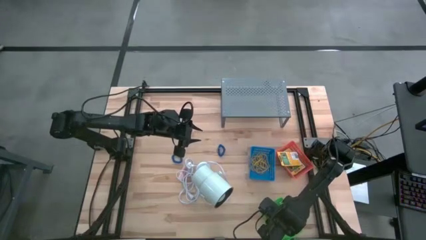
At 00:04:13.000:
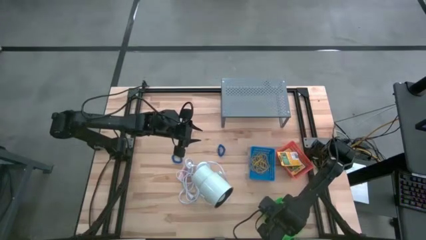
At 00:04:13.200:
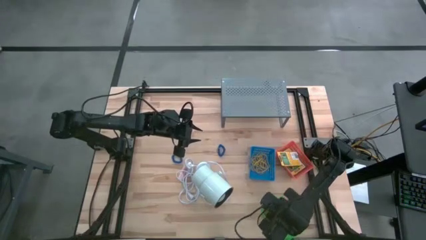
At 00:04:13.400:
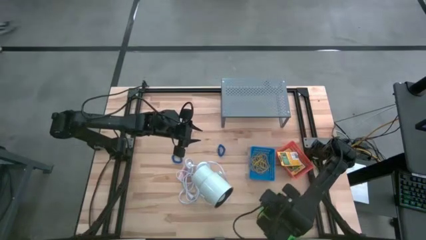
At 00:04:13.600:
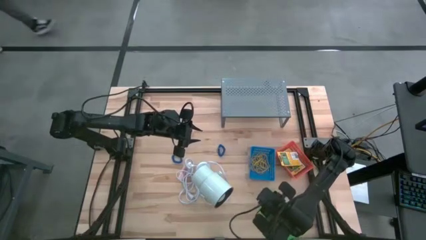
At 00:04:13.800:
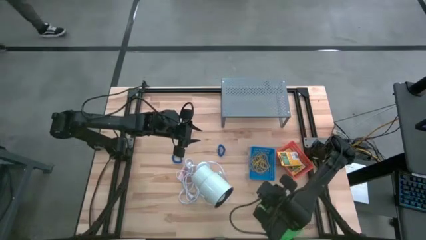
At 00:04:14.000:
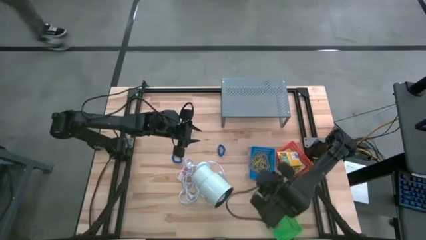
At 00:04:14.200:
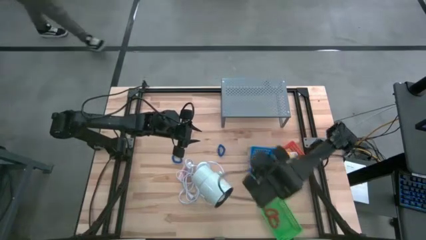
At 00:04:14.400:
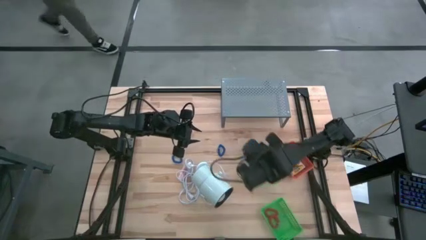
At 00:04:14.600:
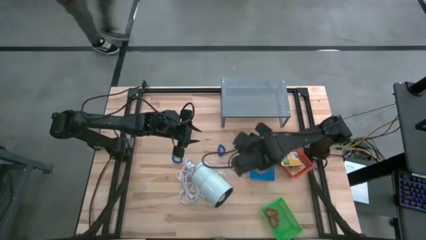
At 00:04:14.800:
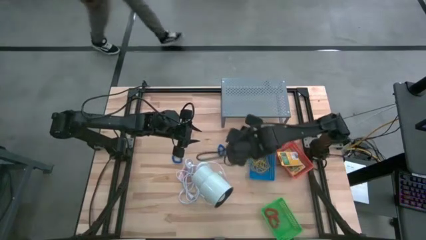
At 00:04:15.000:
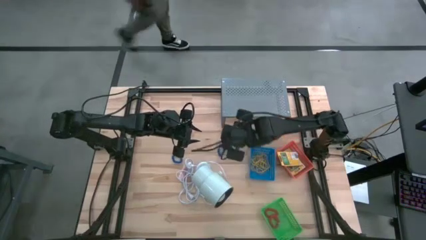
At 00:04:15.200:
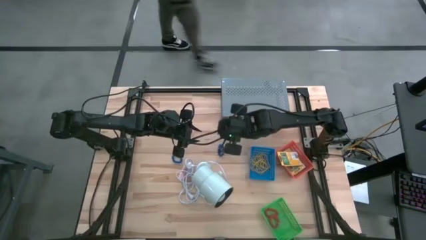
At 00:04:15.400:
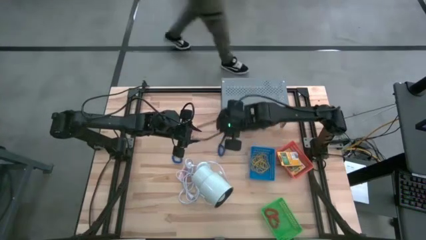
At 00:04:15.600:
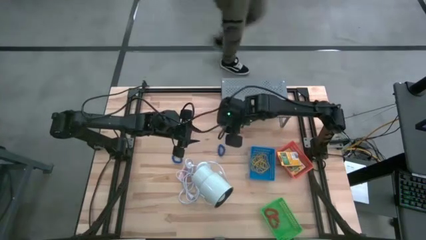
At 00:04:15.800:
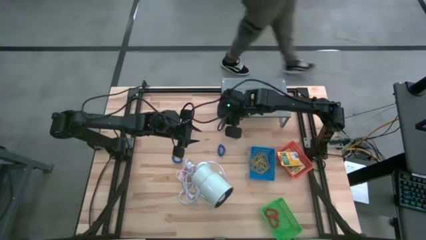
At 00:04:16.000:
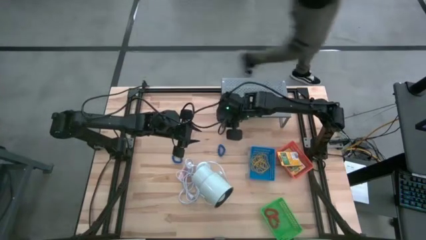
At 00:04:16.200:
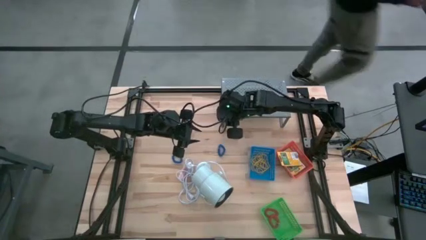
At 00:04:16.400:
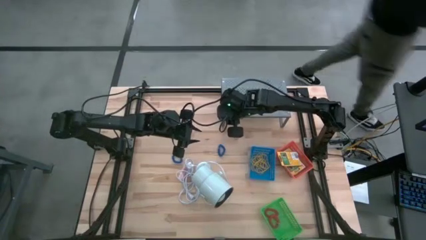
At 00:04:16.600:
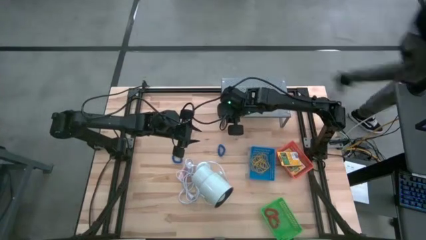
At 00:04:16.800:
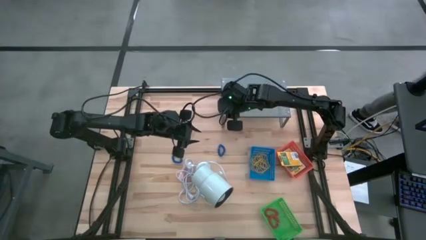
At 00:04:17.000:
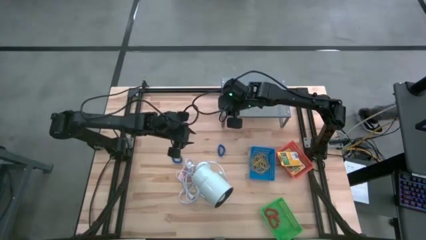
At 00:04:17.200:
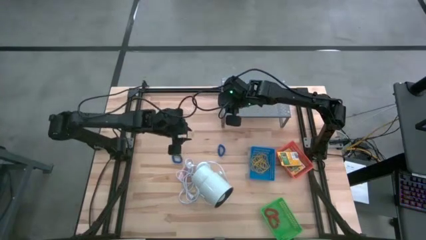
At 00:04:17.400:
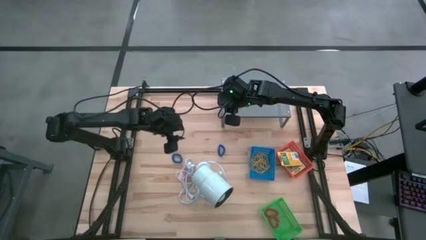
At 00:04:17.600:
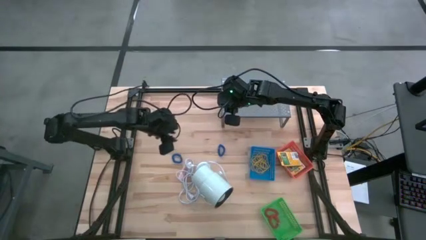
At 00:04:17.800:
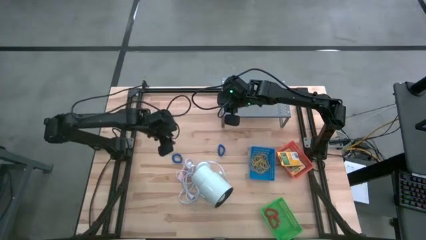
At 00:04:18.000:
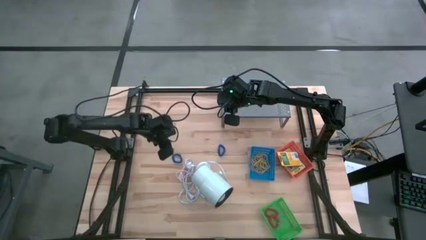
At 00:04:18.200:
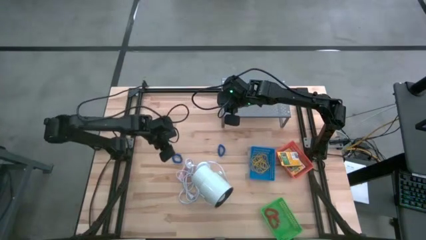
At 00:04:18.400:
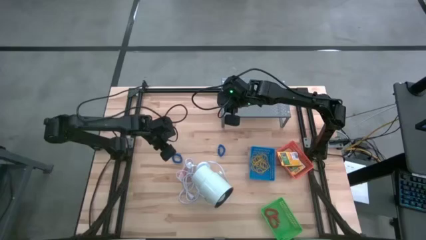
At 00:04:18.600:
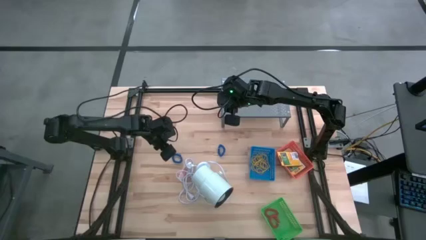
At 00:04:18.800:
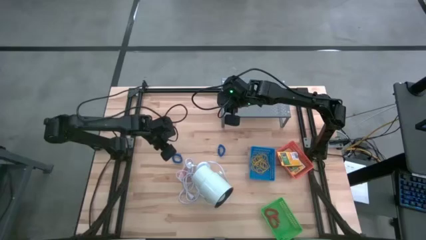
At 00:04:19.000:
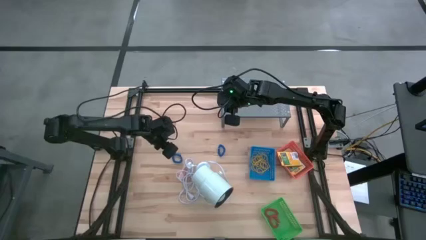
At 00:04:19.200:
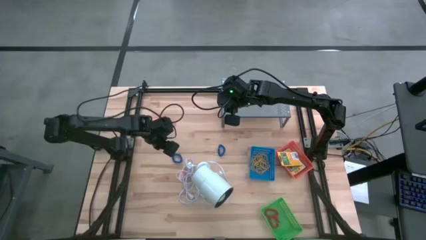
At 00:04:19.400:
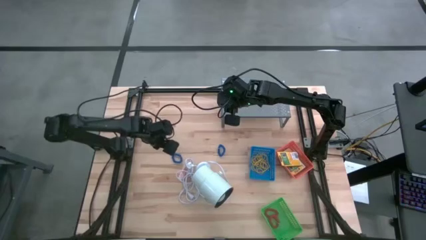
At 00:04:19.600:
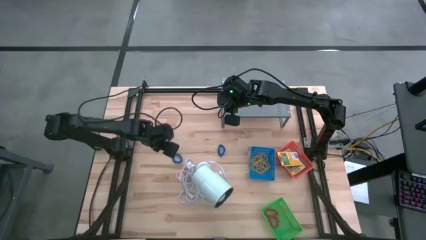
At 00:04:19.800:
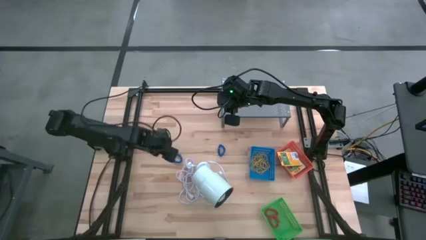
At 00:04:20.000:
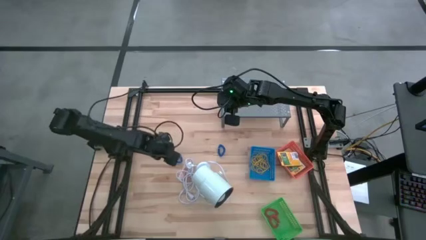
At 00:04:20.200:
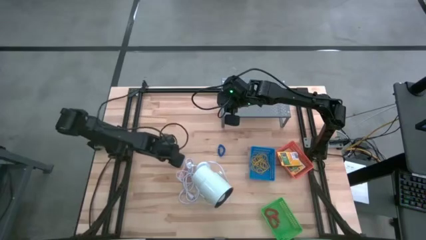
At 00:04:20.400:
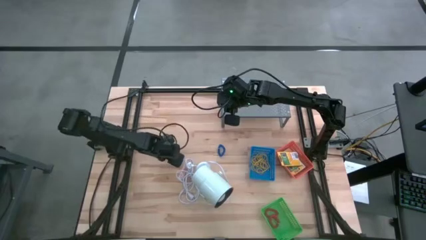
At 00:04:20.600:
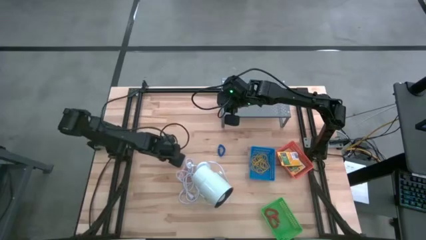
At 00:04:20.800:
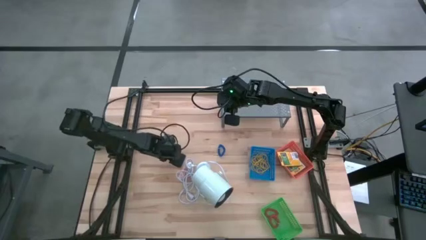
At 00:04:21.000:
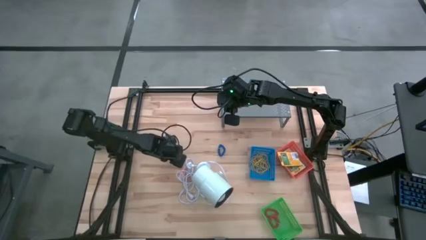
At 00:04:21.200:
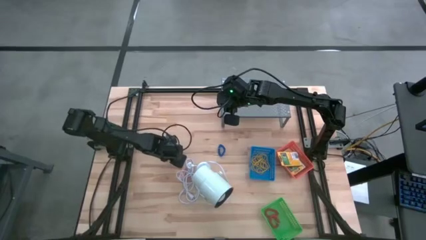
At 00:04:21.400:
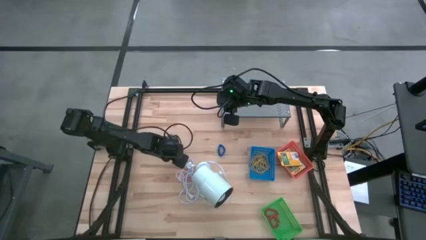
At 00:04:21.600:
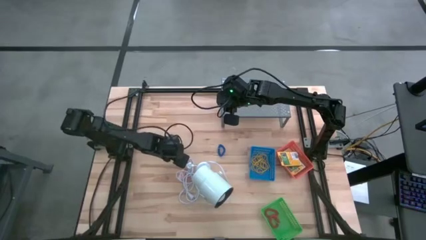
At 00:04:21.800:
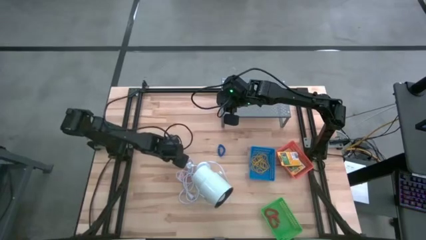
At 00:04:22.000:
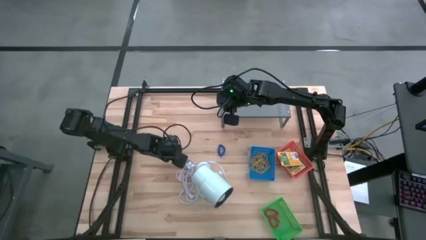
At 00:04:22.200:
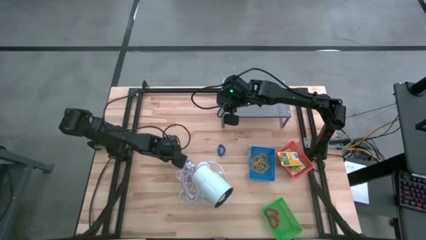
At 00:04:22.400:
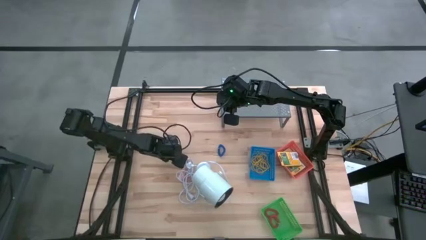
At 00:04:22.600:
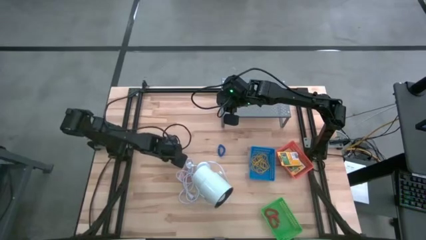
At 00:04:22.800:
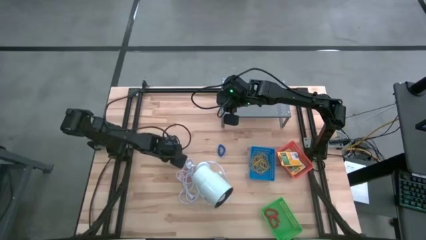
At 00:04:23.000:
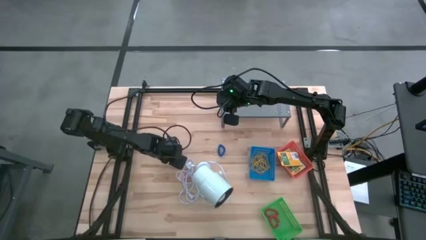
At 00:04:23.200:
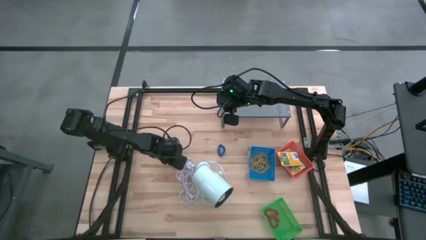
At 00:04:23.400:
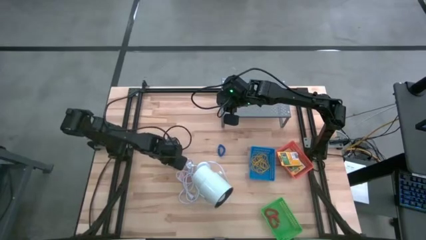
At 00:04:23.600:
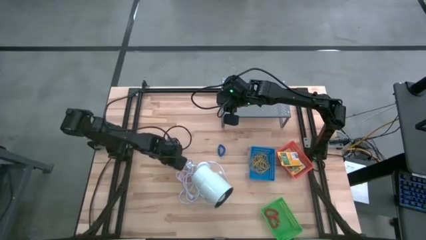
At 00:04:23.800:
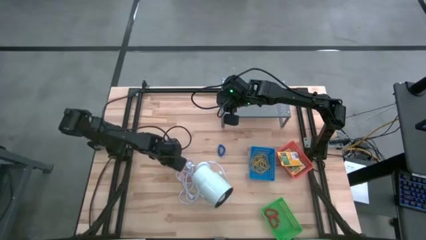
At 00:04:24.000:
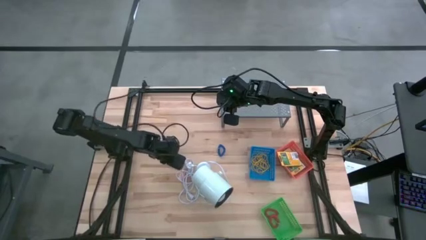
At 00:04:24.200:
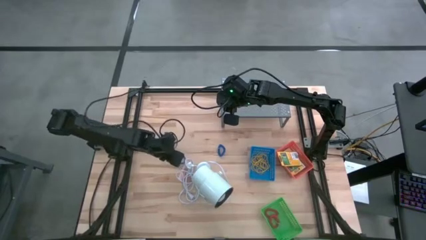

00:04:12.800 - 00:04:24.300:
Task: Pick & Place Office Desk Supplies
Put the blue spring keychain into the green bin

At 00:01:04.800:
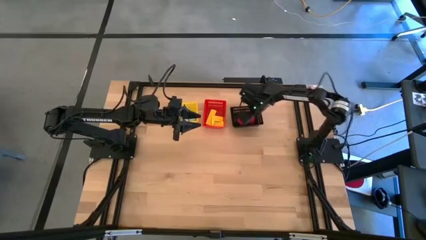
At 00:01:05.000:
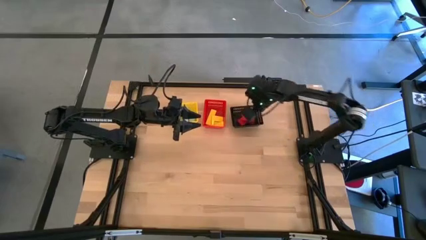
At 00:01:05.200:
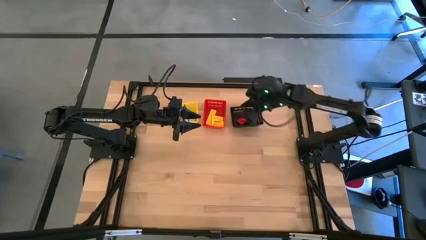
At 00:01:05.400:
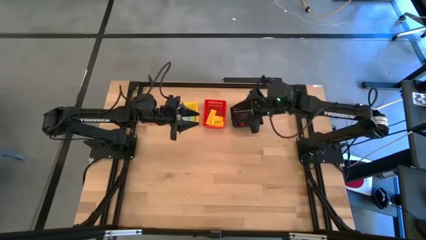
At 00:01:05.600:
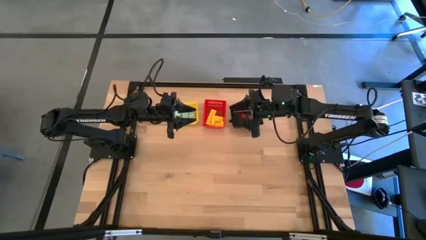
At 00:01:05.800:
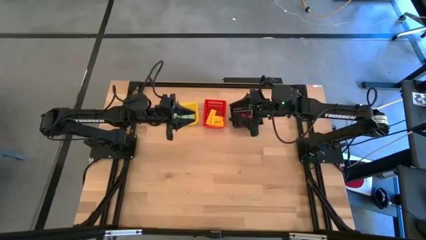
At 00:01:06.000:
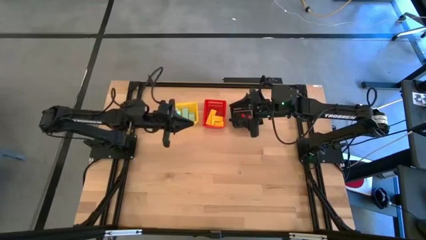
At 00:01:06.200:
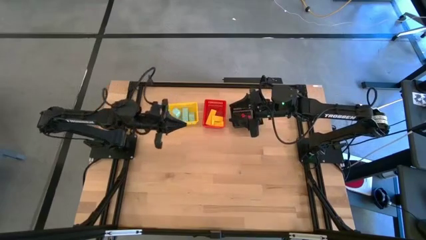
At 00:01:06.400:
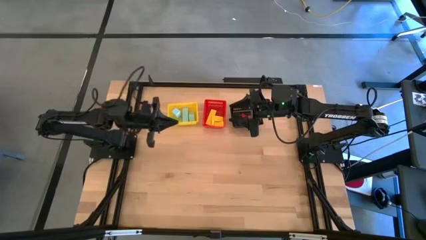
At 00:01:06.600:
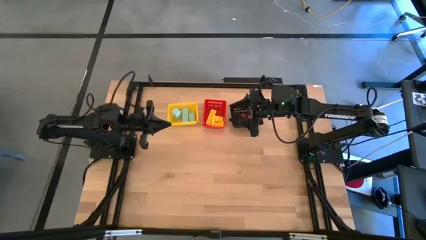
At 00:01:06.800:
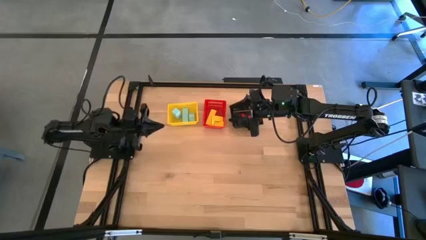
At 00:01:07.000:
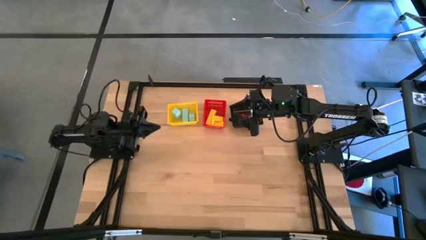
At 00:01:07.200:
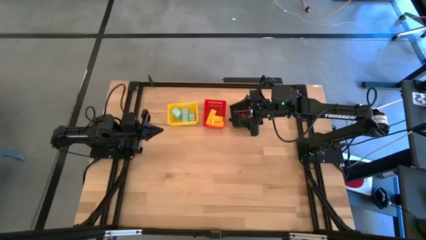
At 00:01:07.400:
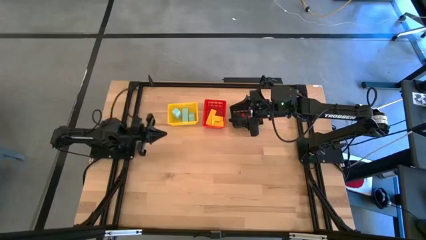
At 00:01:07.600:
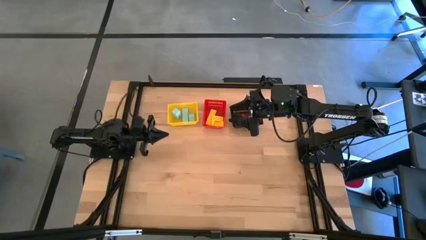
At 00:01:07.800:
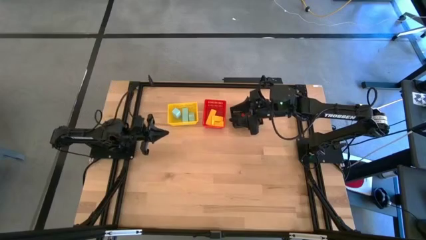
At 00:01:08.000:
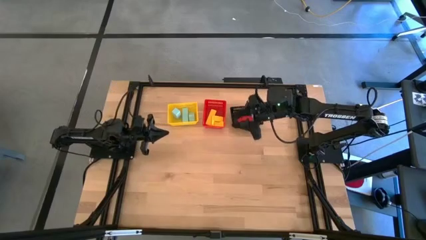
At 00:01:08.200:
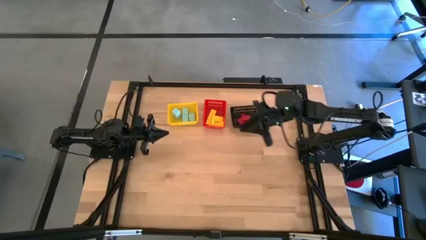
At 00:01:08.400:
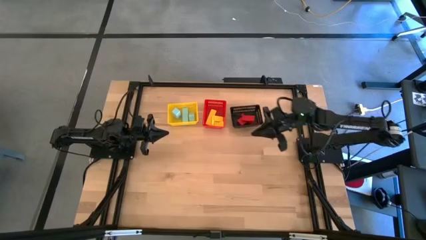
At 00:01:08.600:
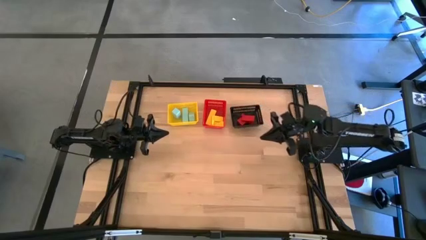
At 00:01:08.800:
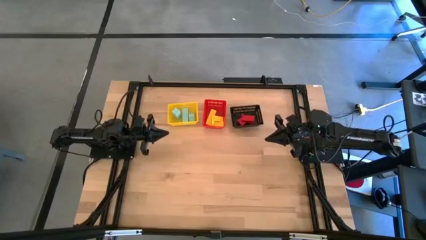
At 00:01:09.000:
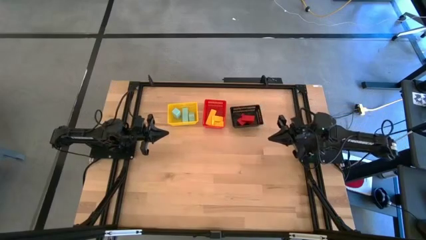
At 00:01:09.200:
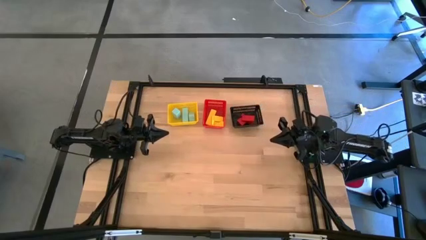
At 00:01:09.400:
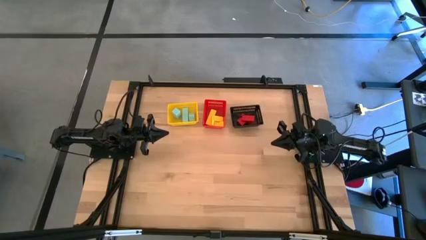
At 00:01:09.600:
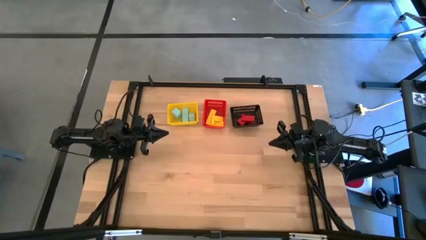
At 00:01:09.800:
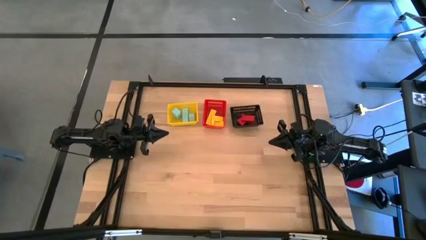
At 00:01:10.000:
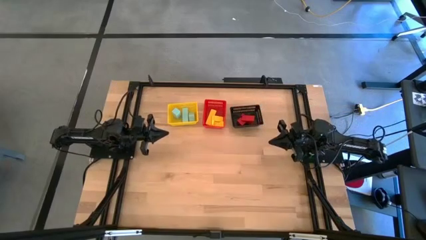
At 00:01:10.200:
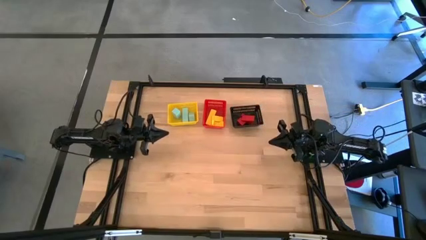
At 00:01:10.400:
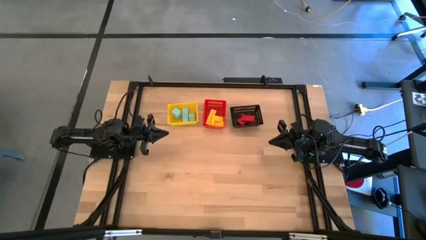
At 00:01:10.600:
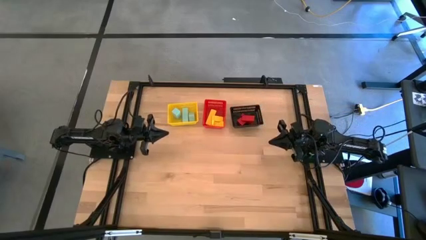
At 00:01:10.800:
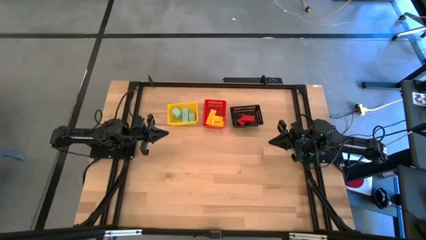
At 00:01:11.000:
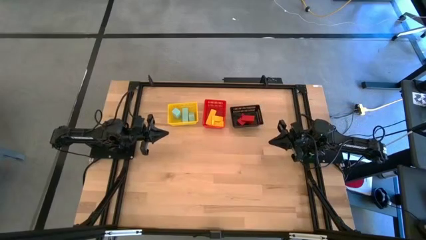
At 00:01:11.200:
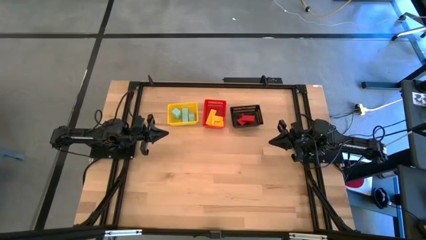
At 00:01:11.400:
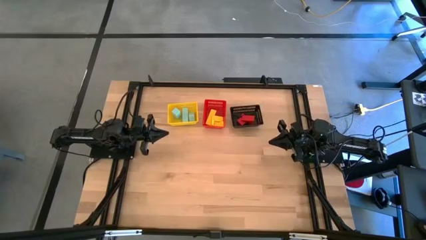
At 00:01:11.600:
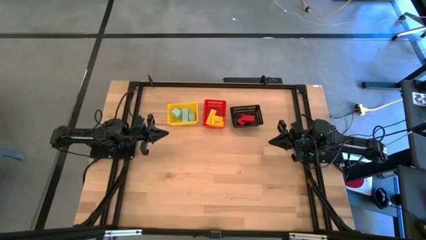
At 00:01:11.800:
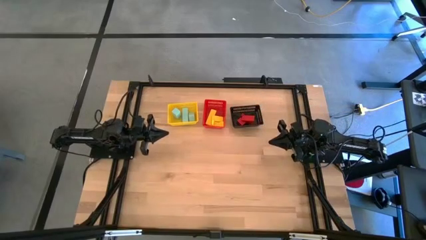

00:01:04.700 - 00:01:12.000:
Task: Sort & place blocks by color
Return to Home Position
